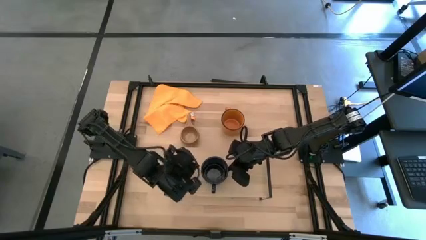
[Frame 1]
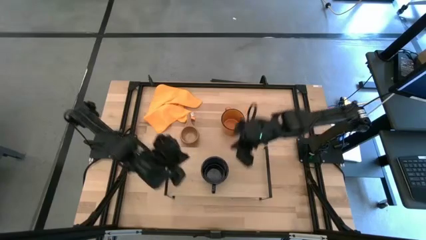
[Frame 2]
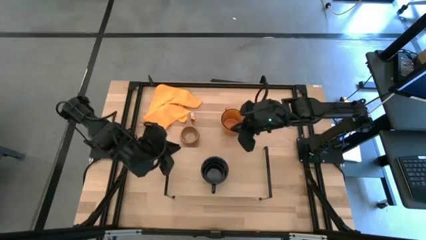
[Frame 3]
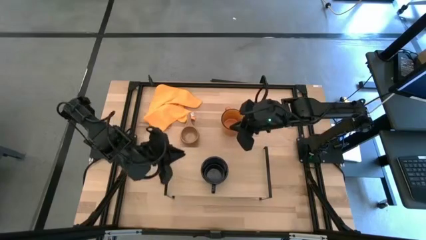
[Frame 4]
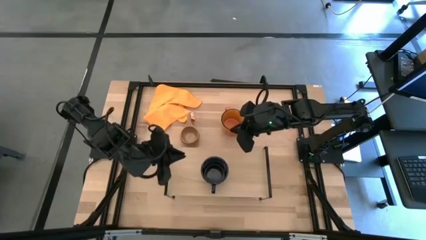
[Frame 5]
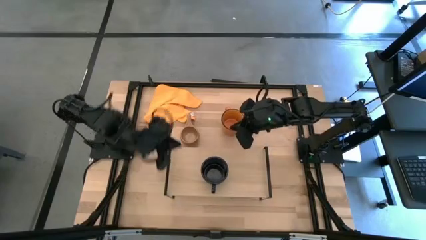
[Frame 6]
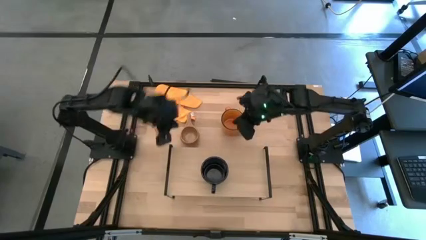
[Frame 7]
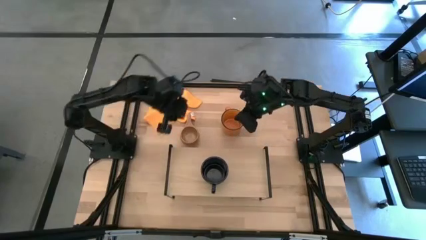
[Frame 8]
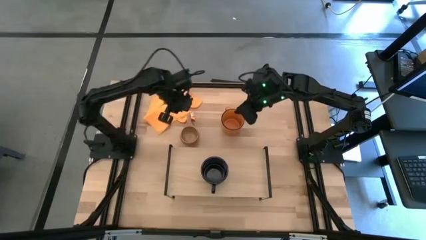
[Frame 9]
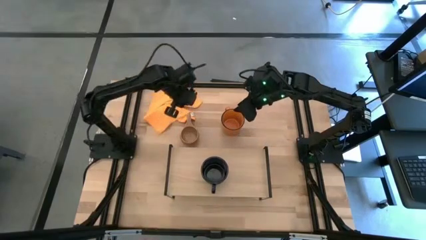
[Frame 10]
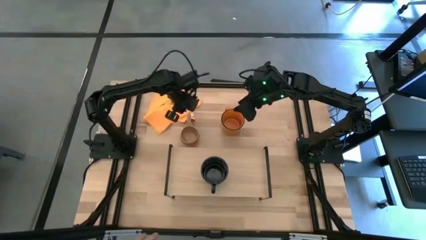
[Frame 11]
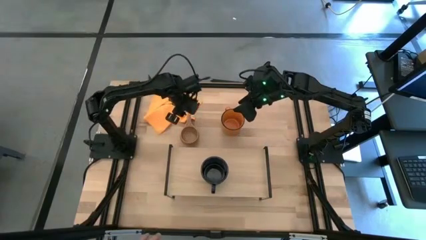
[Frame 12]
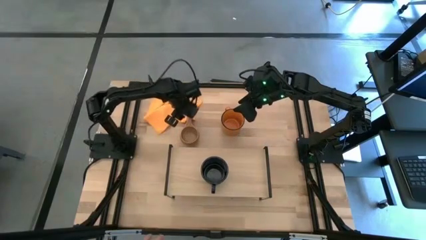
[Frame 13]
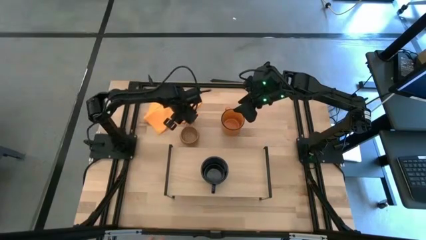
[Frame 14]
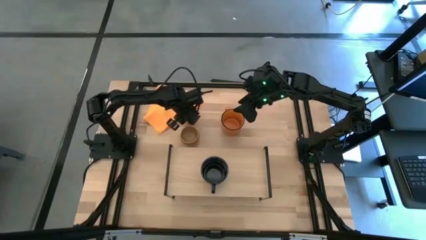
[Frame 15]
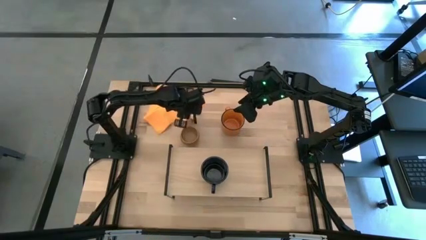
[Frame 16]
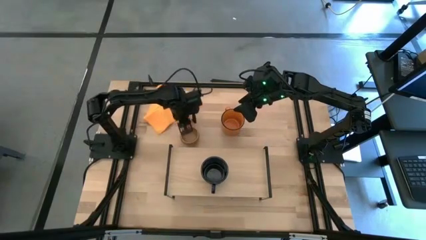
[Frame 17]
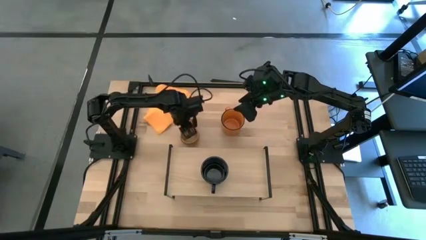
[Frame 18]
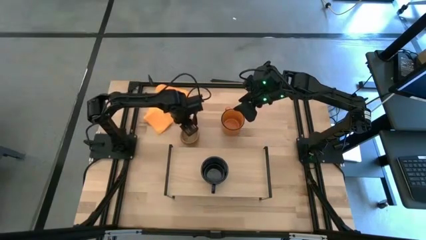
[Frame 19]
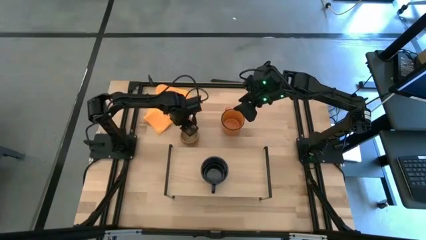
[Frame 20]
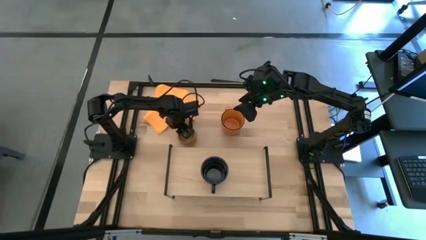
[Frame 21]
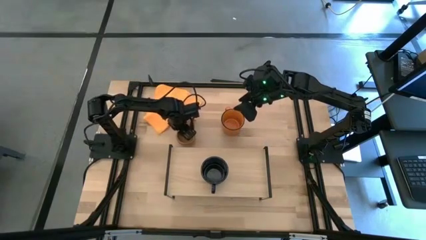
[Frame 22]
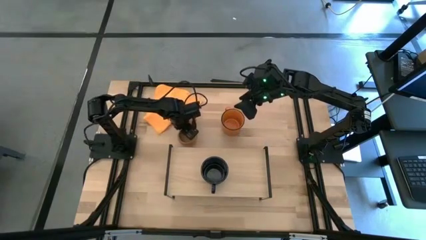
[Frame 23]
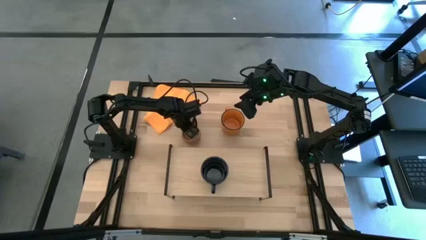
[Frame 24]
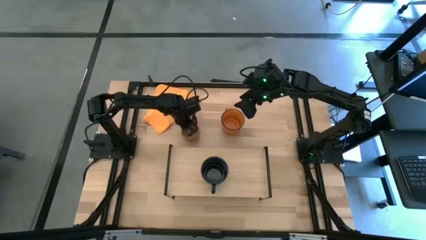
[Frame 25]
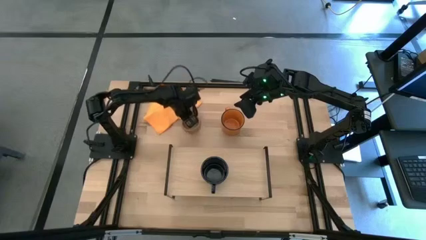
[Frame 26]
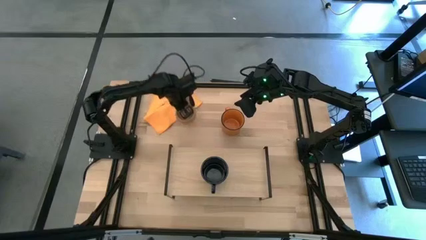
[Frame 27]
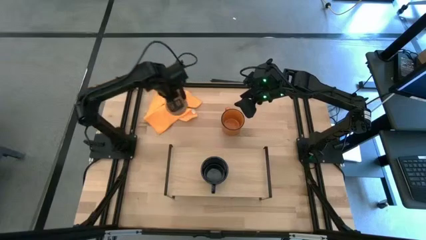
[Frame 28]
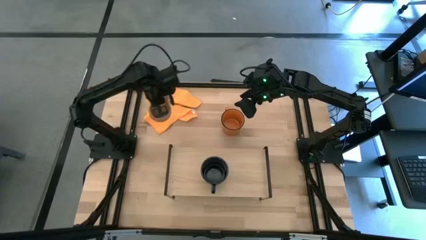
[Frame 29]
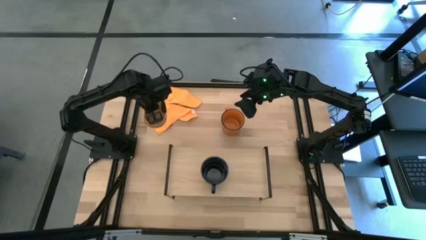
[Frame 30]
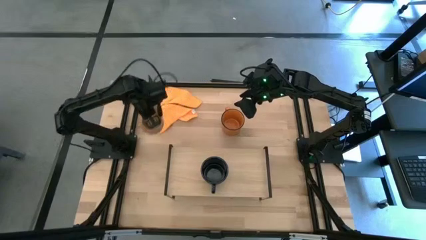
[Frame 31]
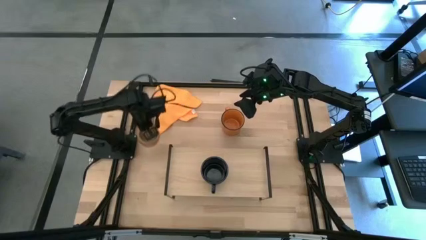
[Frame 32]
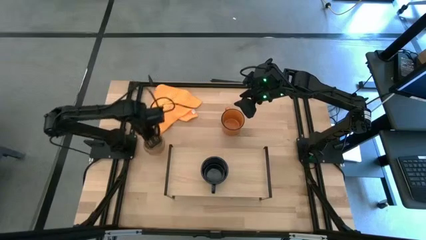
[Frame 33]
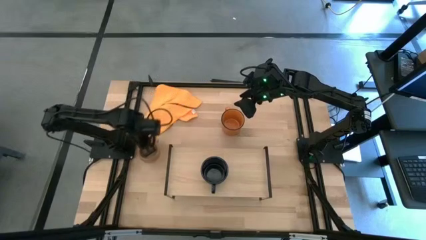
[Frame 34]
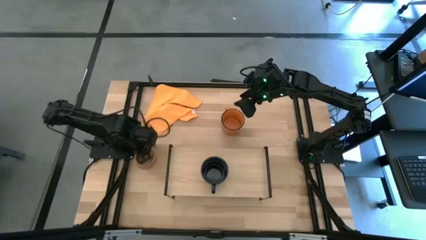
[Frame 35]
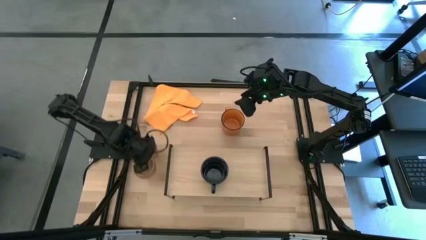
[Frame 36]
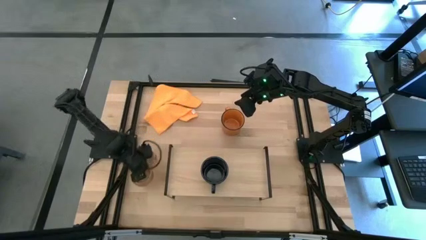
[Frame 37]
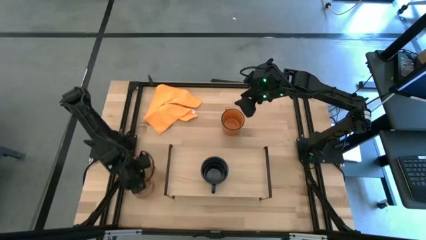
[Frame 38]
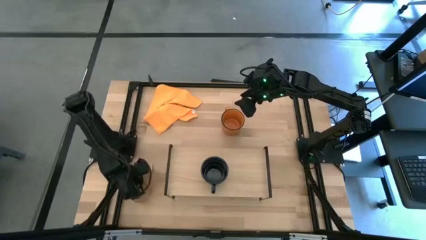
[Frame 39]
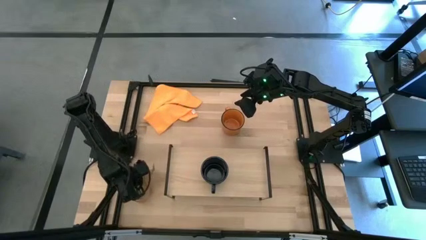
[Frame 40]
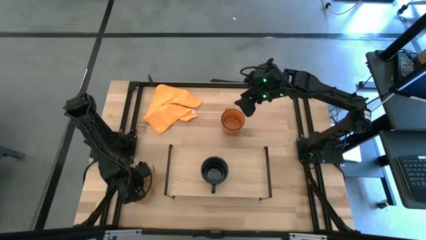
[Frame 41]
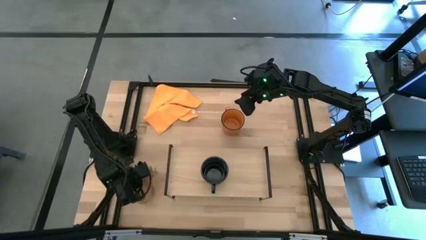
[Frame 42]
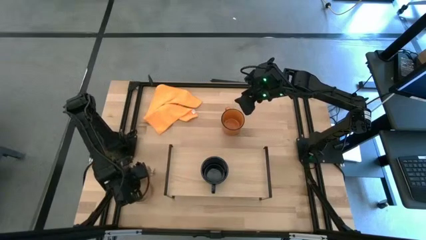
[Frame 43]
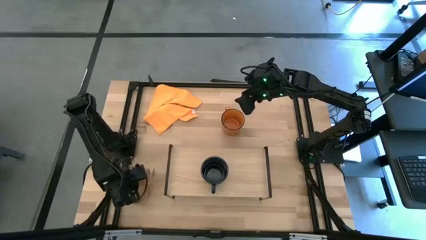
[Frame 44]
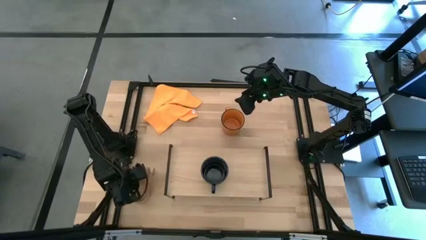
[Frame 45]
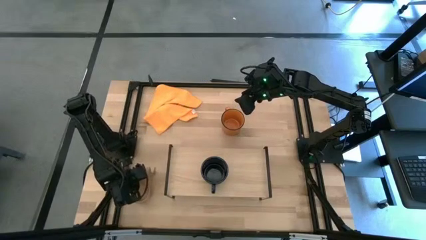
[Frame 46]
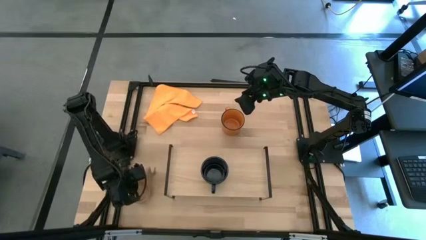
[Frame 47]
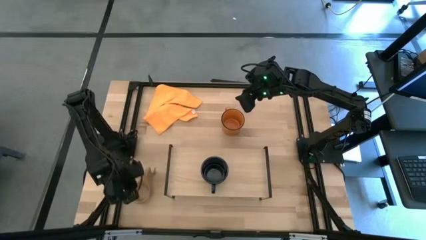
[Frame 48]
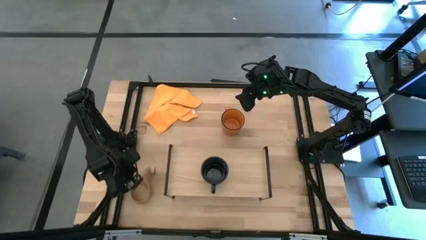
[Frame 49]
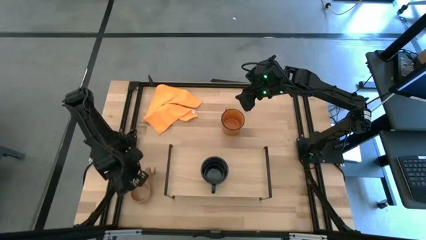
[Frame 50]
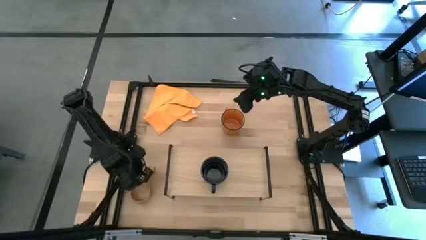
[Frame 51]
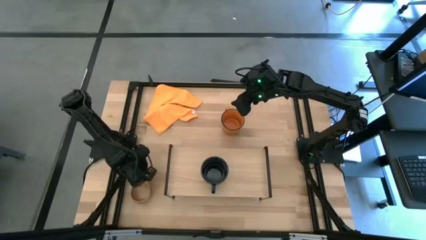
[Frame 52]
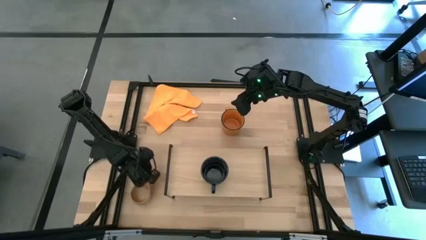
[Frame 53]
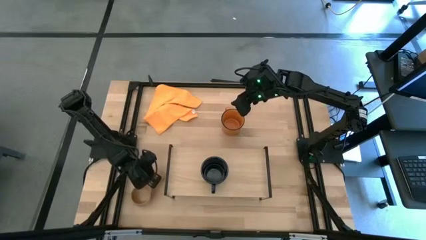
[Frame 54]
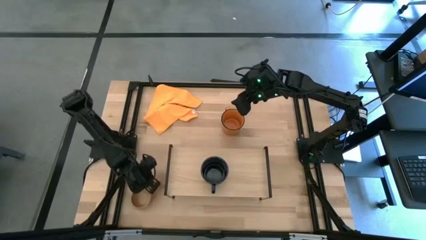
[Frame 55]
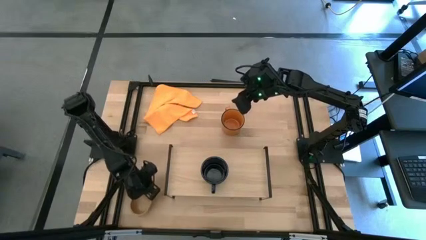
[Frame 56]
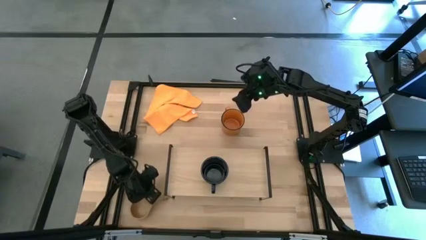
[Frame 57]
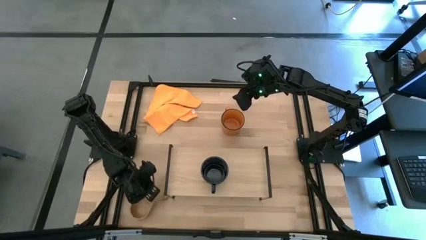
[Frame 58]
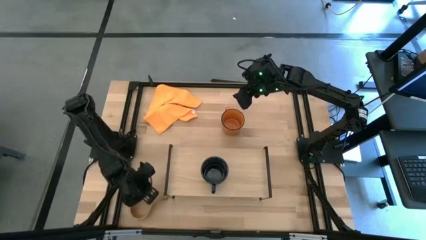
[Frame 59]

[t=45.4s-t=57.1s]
Task: Stack small to large cups/mugs on shelf
Put the brown mug on the shelf

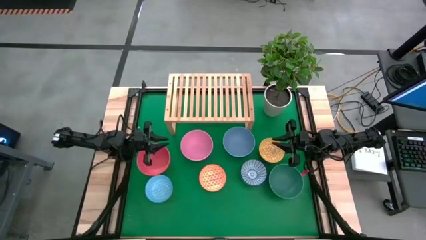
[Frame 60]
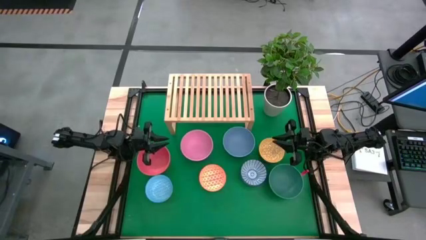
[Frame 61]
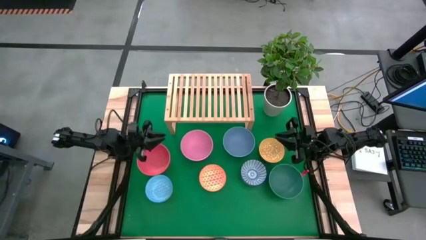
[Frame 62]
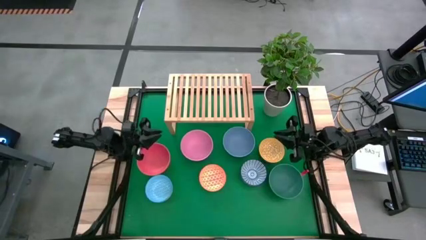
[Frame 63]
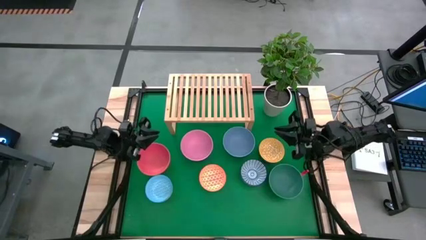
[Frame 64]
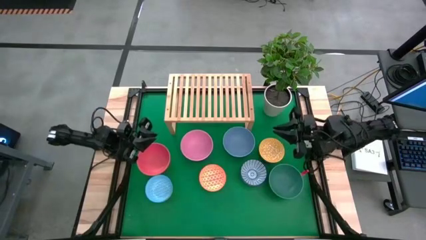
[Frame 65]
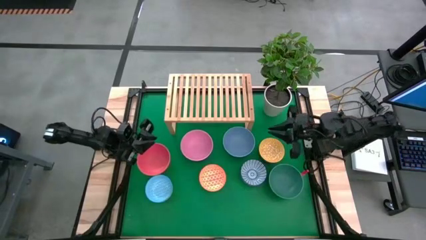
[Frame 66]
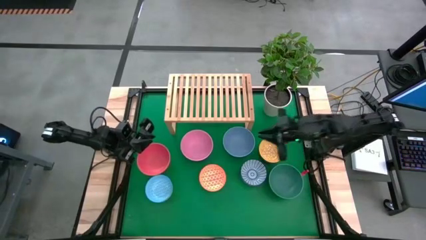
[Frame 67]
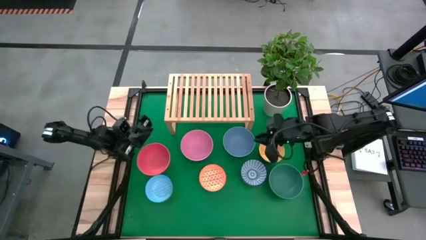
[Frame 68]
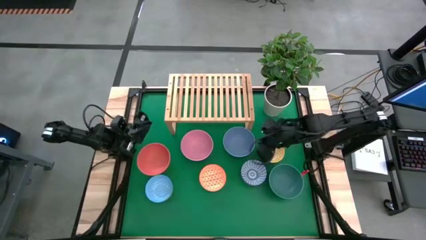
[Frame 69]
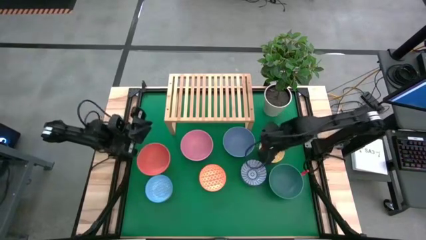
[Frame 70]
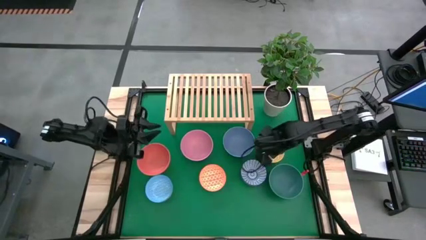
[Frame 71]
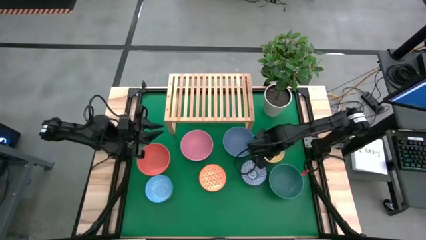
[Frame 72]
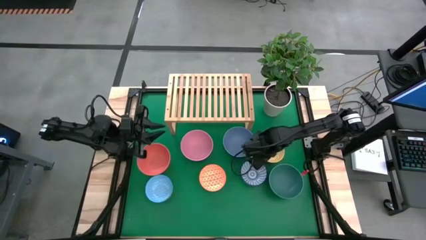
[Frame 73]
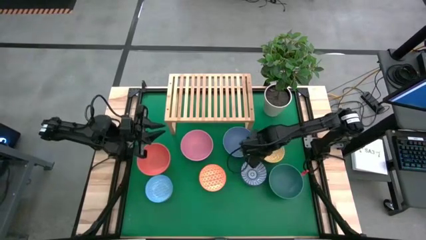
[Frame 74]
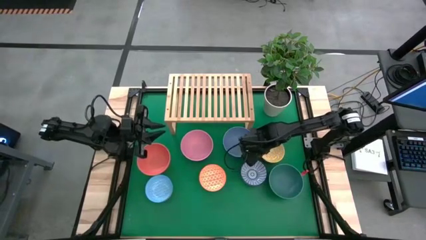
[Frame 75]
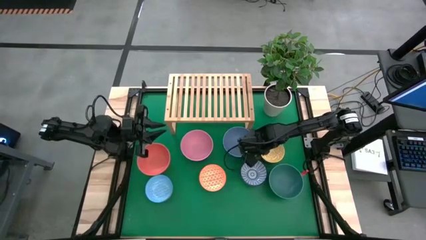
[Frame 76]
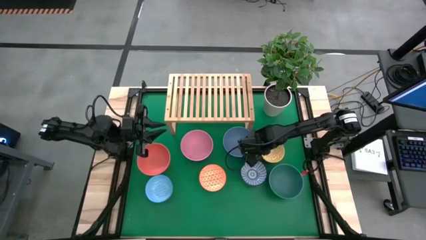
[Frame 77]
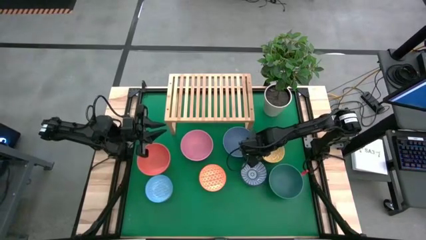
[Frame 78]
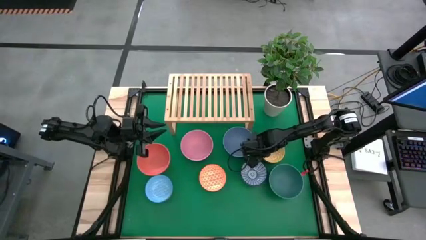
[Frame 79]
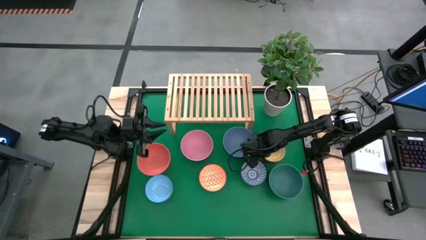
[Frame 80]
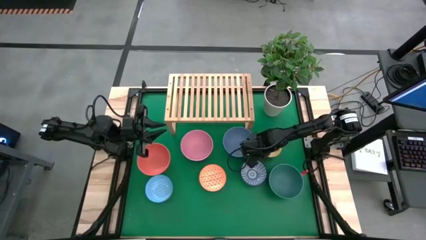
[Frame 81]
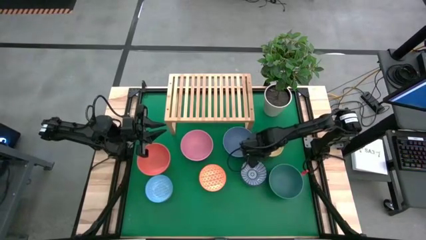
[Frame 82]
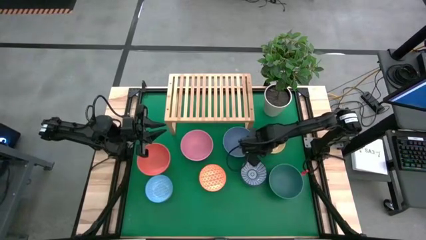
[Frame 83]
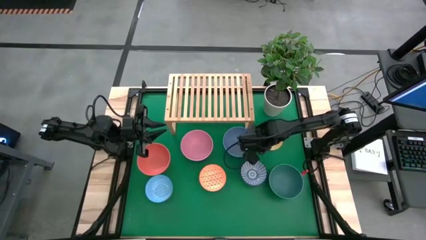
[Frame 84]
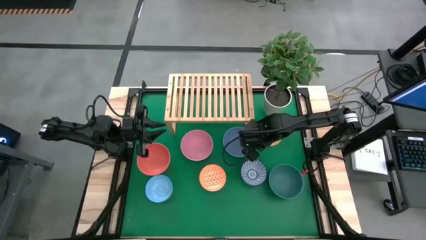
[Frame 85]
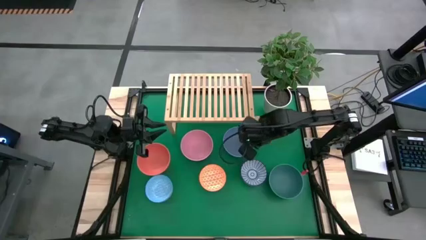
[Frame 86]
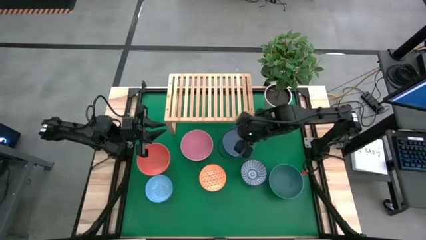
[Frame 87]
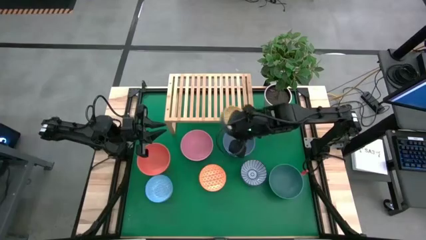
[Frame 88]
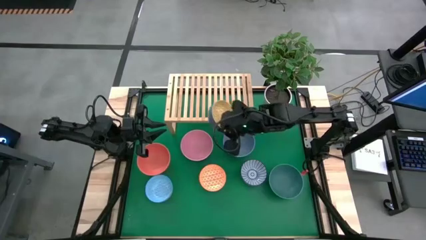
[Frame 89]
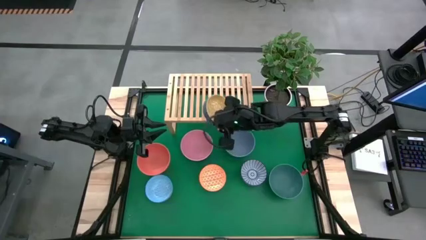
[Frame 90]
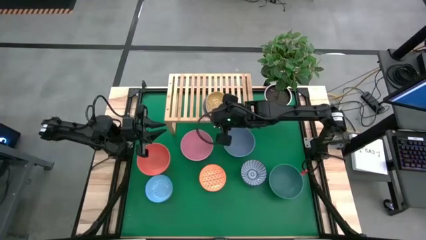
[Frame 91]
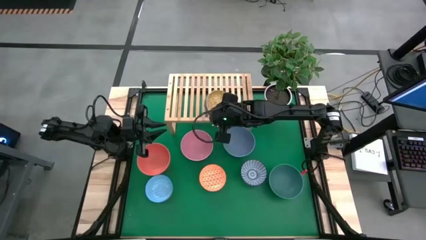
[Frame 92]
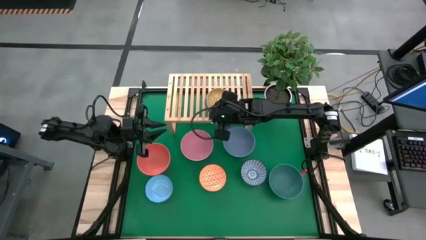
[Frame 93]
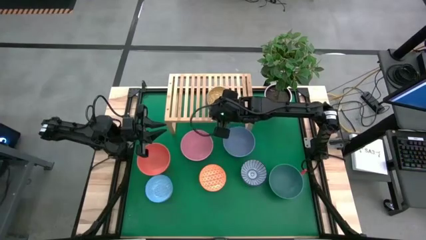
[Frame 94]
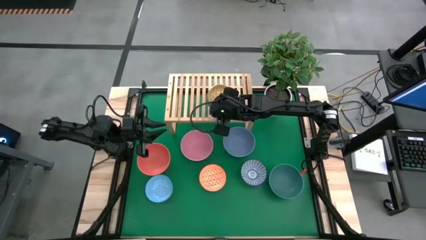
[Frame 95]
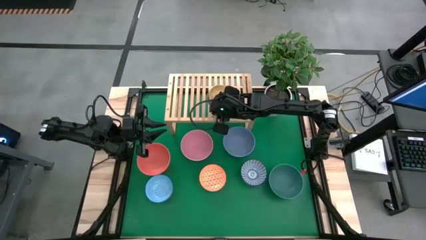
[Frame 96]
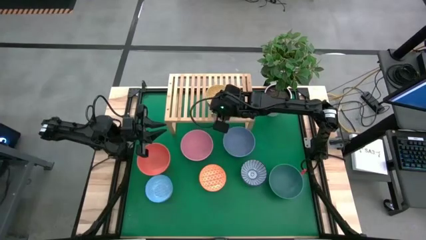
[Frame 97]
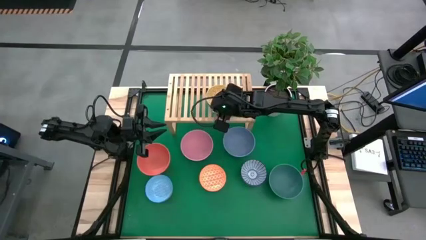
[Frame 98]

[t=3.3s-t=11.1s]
Task: Place and stack bowls onto a shelf
Put the yellow patterned bowl on the shelf
